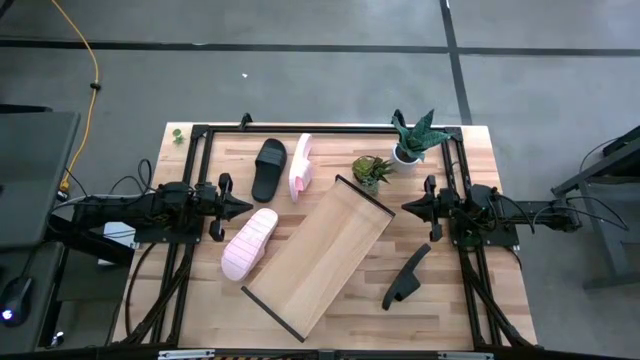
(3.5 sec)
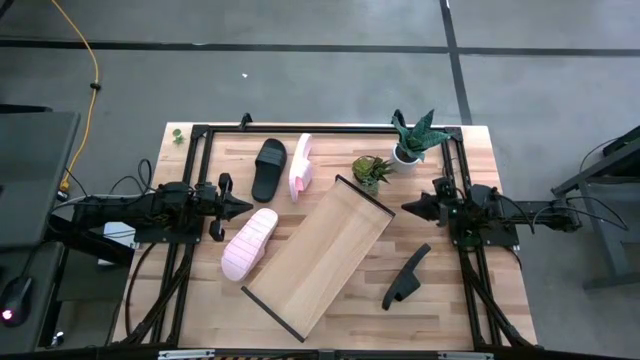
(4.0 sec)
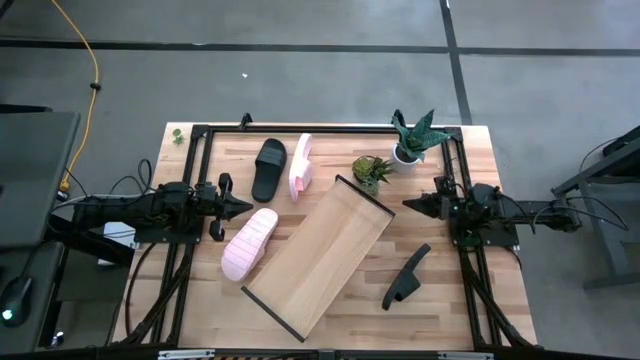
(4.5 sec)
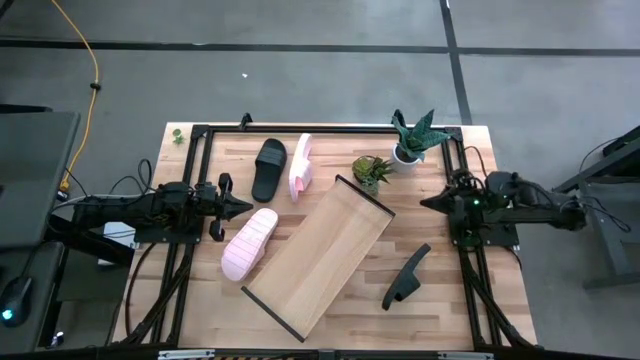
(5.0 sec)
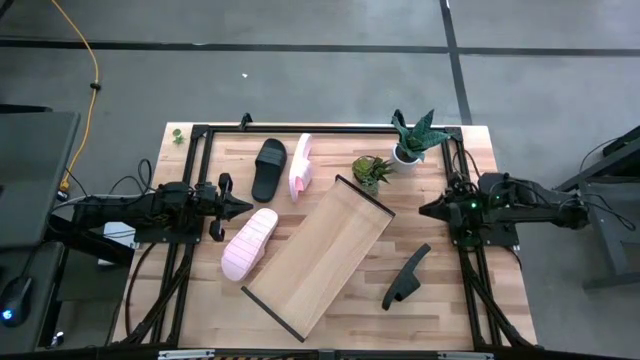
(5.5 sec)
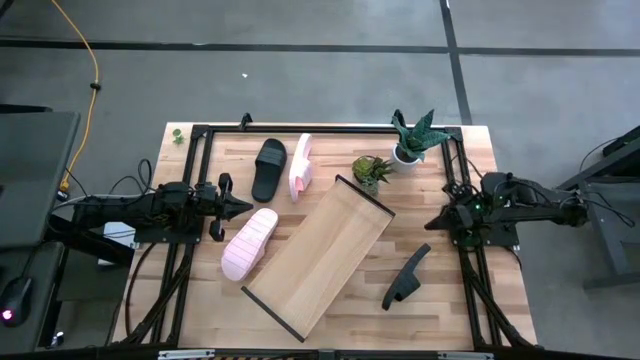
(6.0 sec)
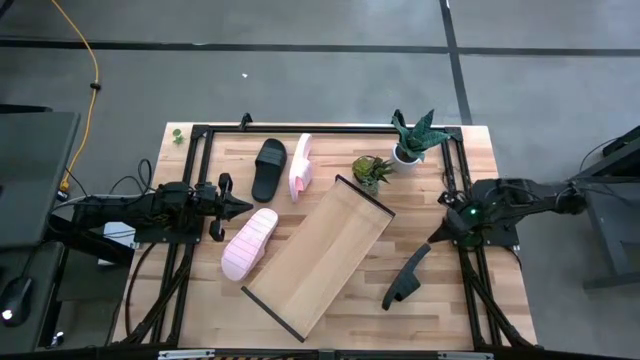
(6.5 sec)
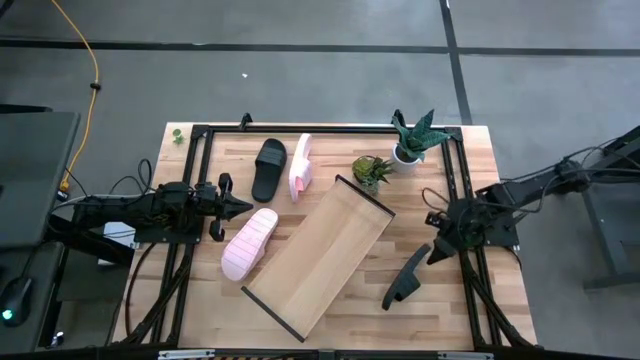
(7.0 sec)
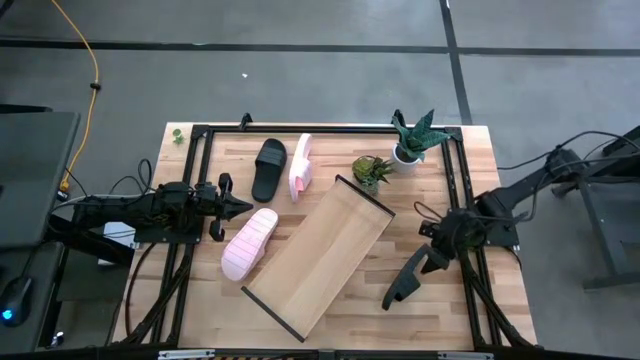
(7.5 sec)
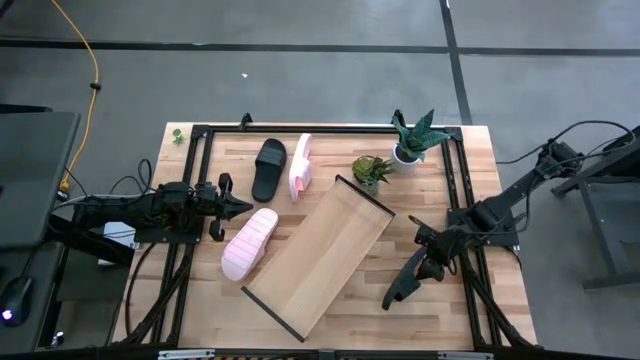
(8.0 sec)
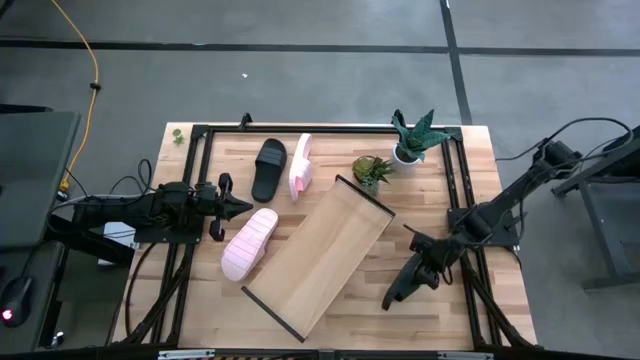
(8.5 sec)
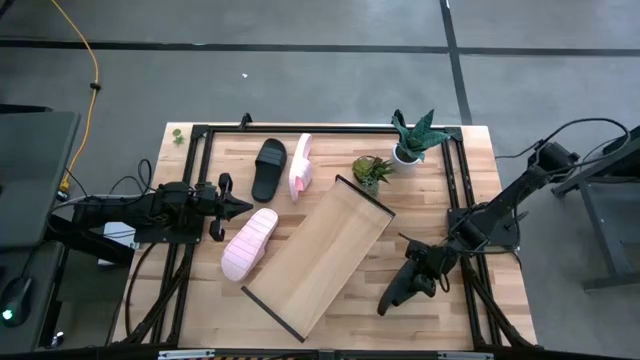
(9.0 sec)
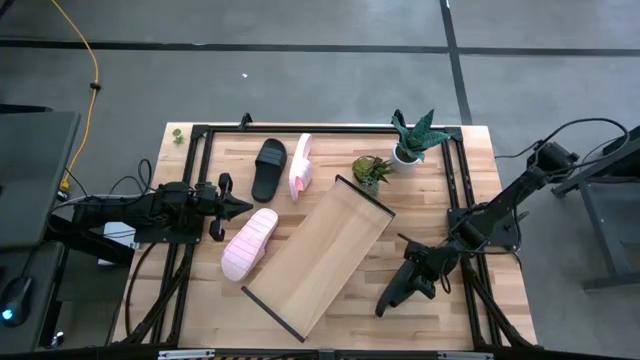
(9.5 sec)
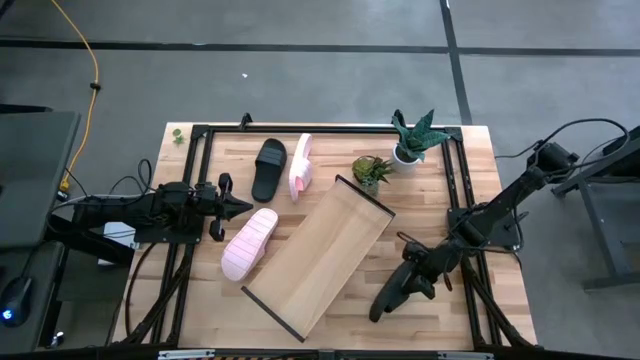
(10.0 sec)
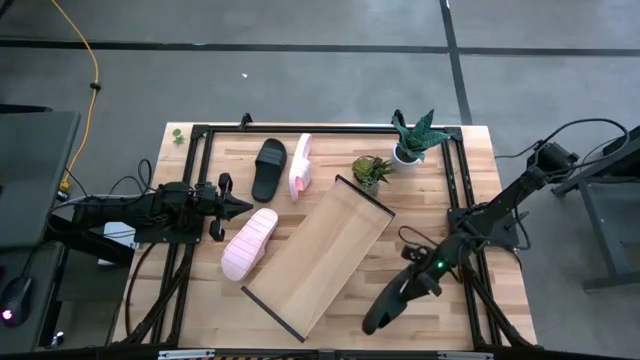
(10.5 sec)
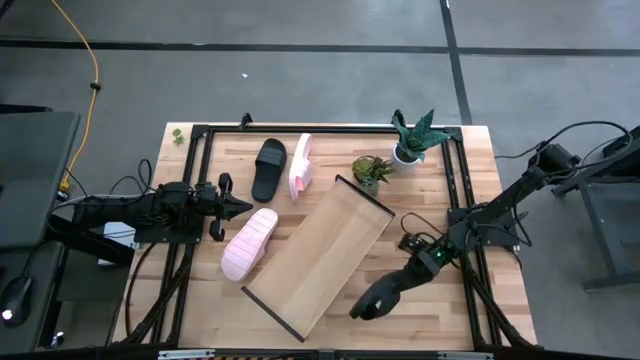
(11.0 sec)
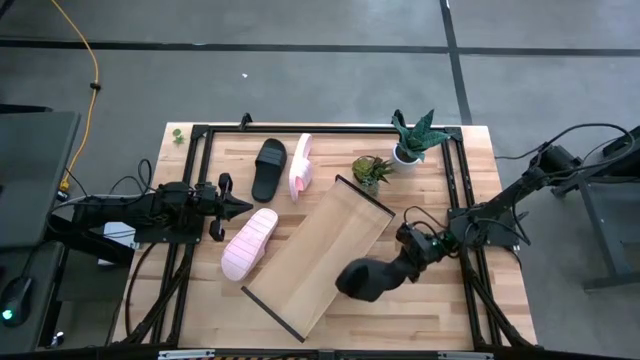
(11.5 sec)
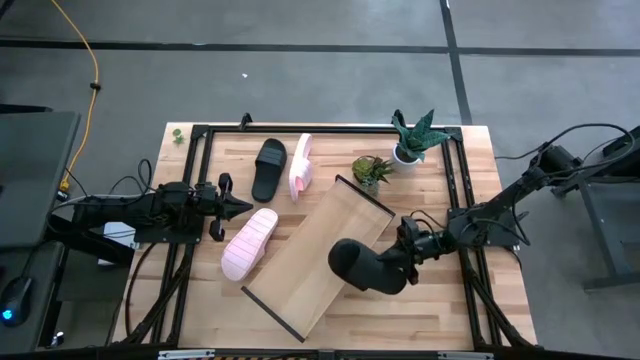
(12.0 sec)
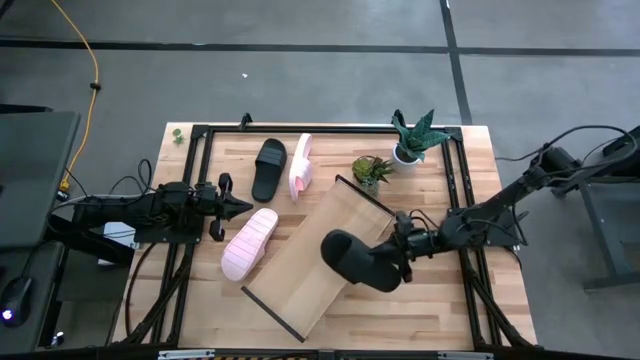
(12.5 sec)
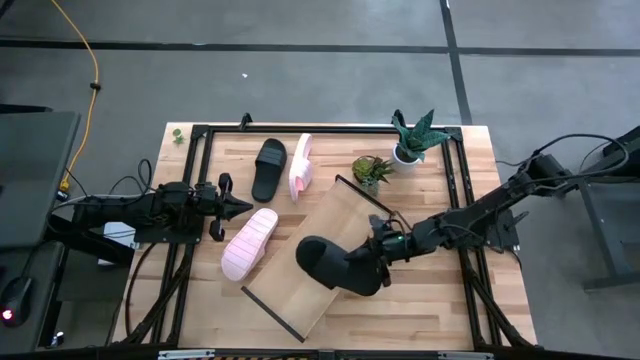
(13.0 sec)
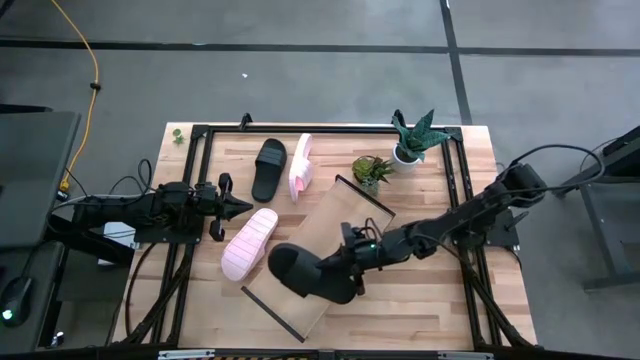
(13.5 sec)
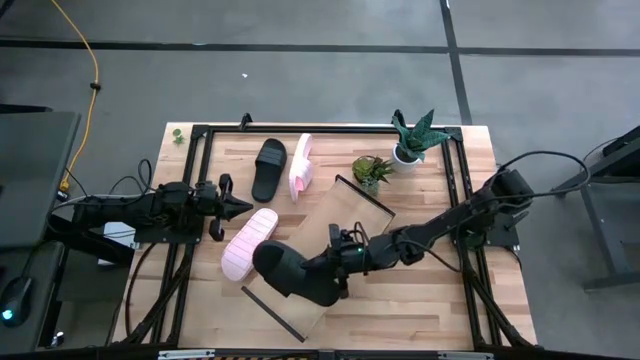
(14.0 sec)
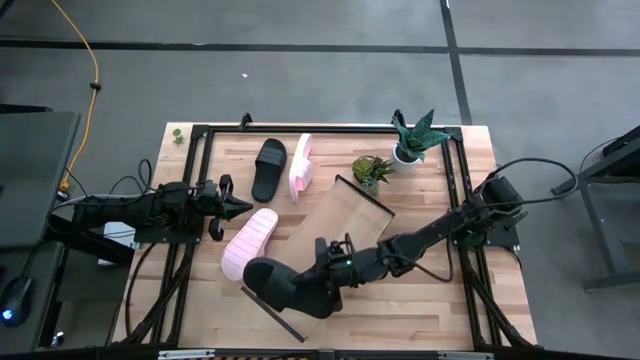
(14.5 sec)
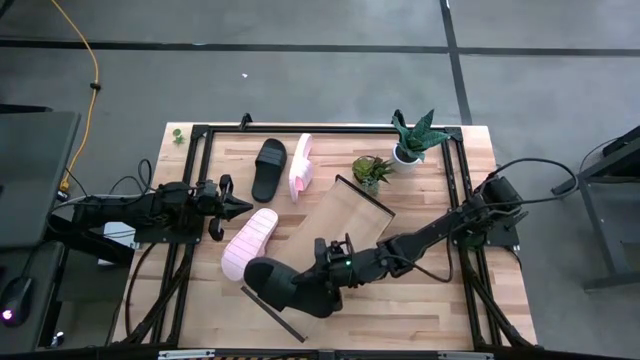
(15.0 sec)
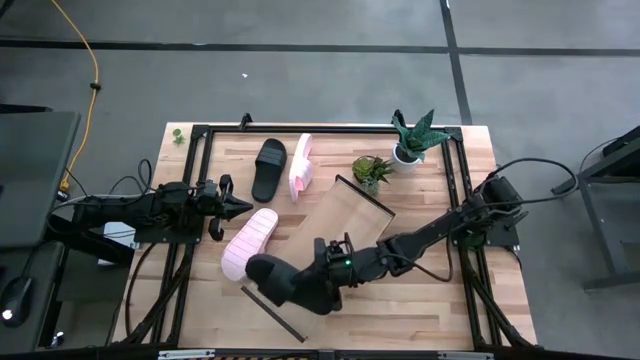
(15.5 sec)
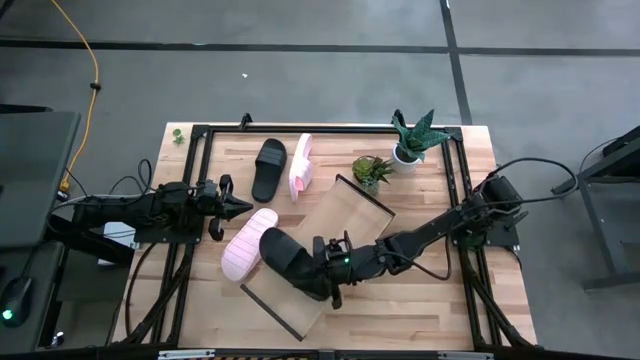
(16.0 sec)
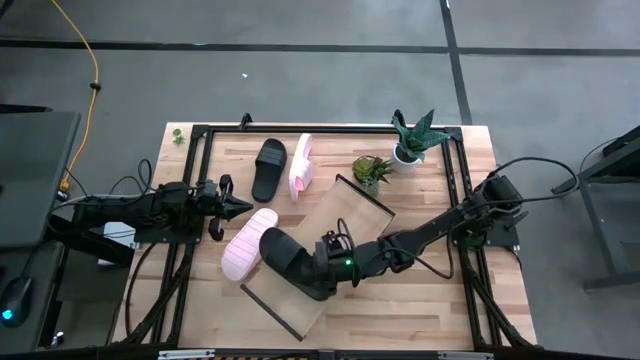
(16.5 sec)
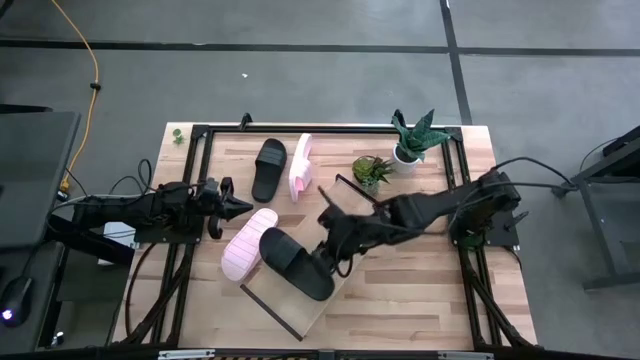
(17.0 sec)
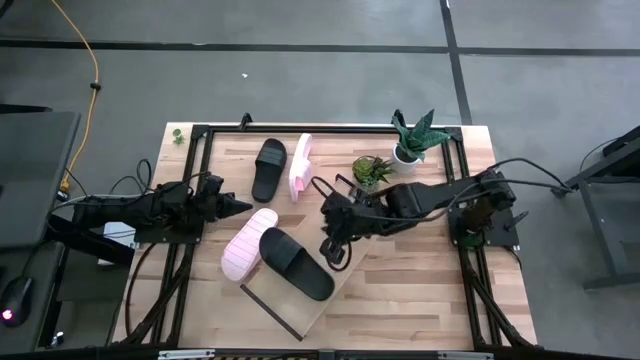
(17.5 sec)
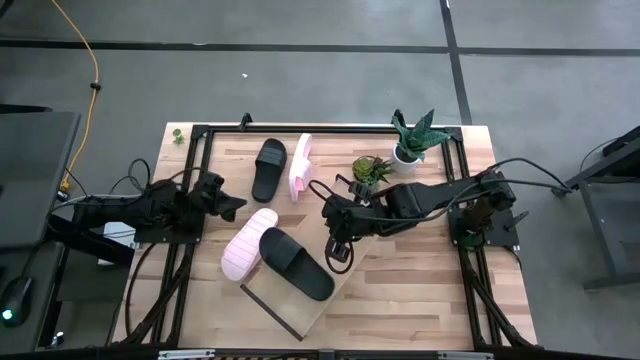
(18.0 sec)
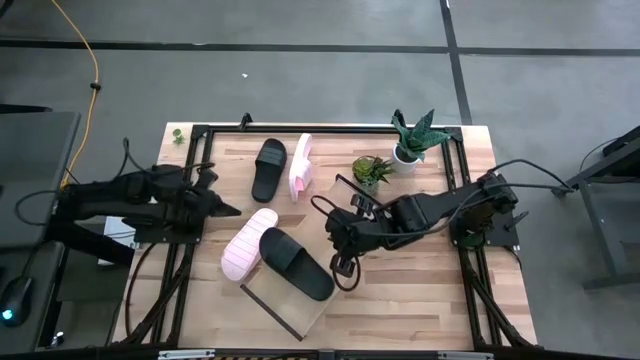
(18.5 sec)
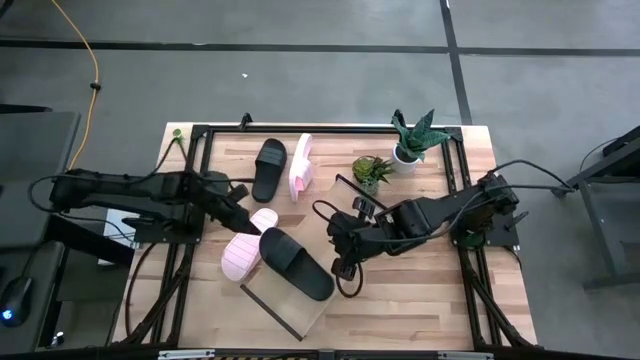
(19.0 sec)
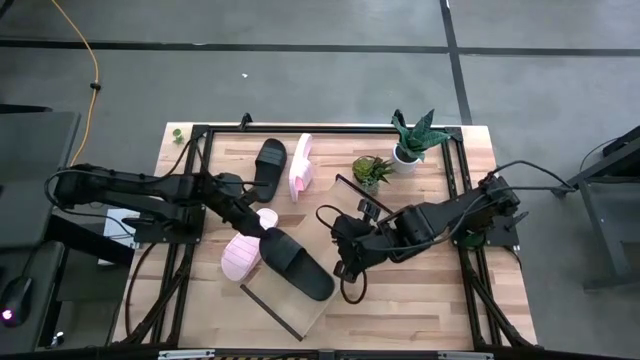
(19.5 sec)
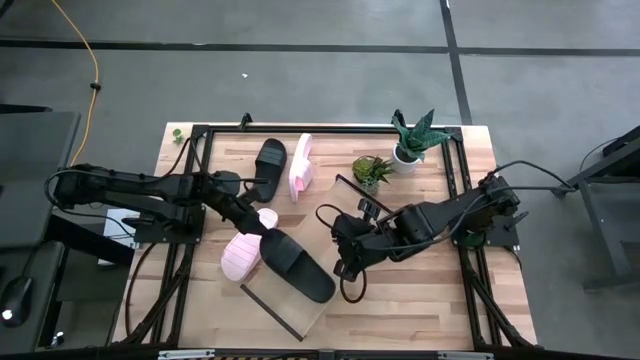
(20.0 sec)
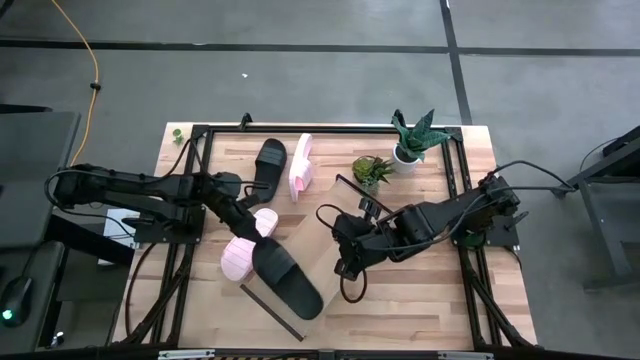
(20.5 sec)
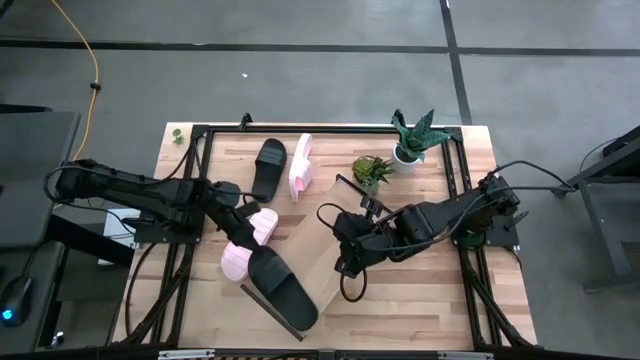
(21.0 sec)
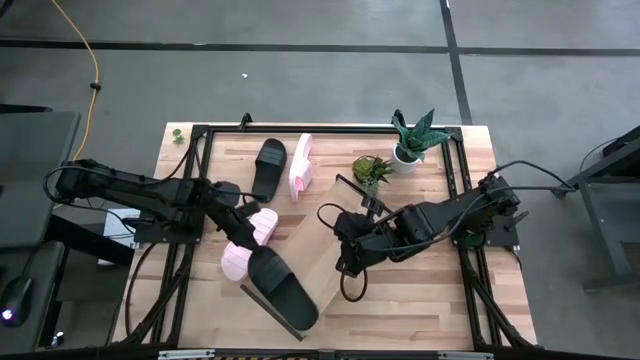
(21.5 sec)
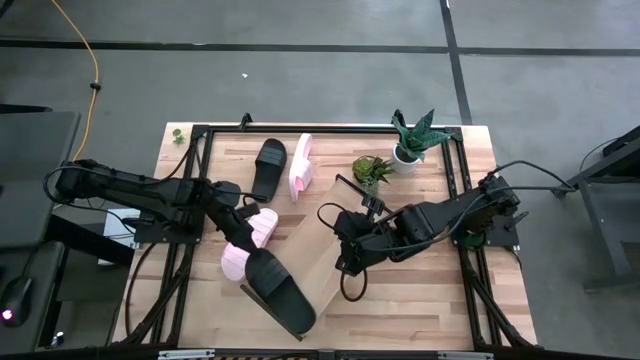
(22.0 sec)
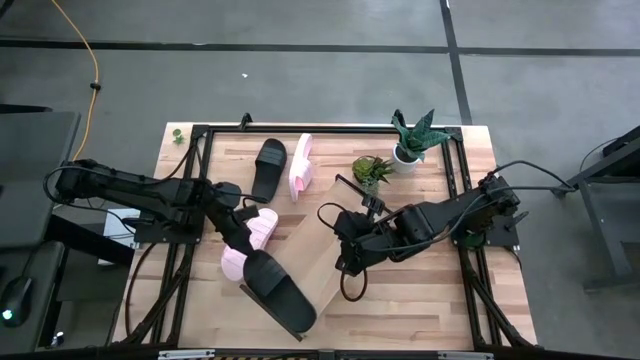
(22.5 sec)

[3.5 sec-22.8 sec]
Task: Pick and place slides into the shelf
Put the bottom black slide on the shelf
